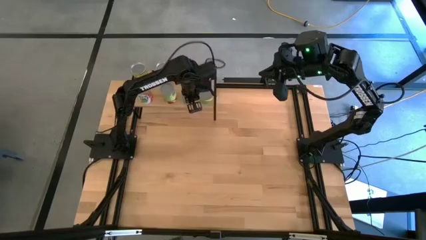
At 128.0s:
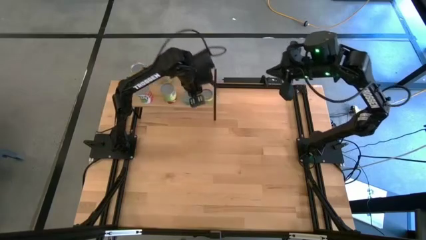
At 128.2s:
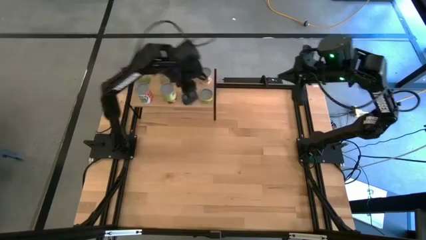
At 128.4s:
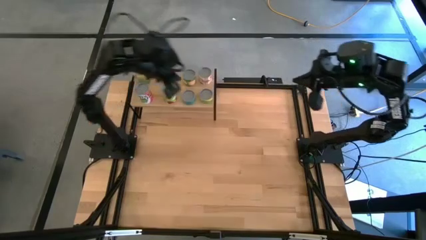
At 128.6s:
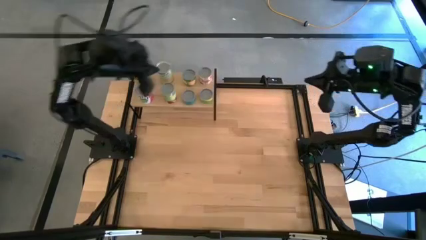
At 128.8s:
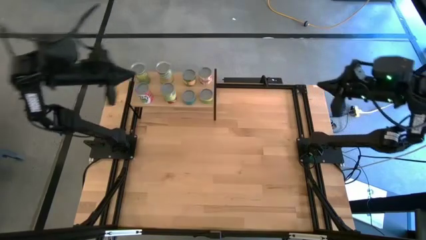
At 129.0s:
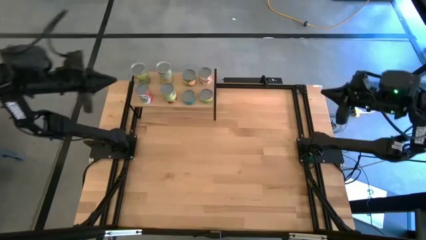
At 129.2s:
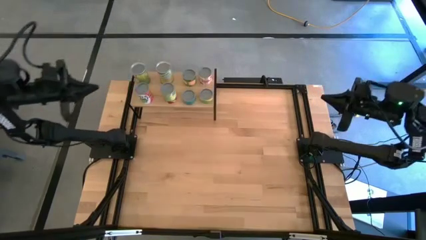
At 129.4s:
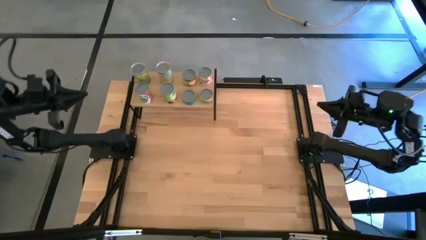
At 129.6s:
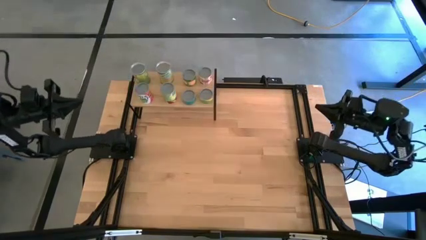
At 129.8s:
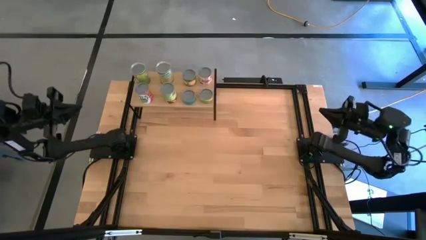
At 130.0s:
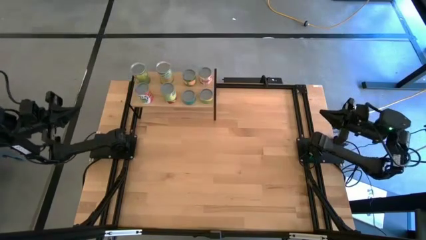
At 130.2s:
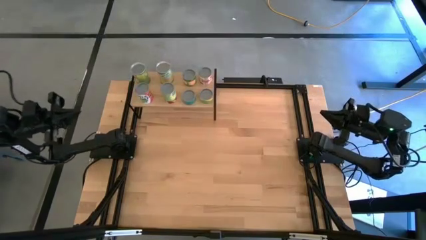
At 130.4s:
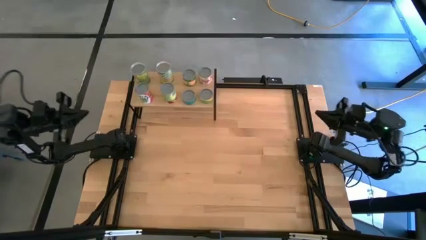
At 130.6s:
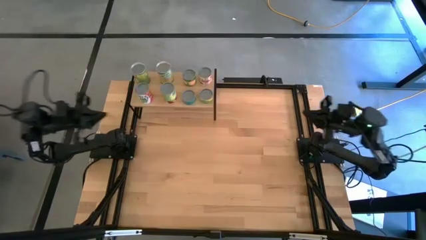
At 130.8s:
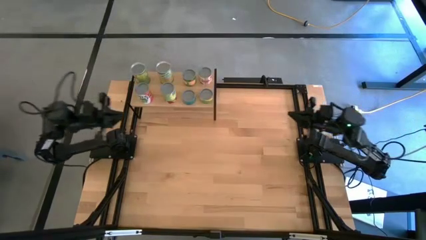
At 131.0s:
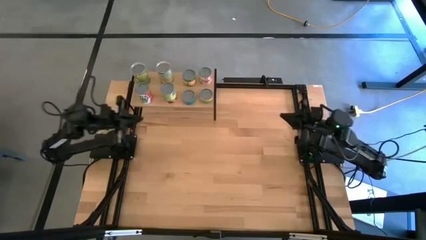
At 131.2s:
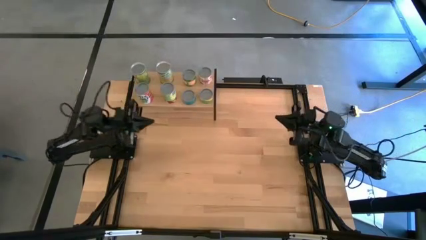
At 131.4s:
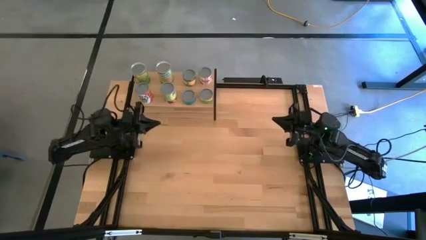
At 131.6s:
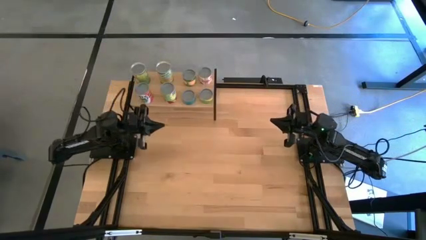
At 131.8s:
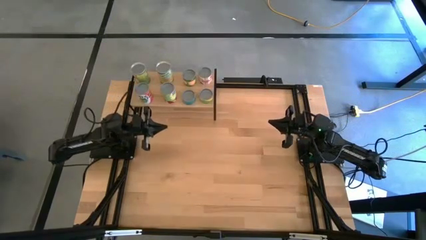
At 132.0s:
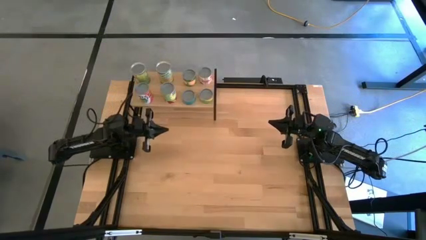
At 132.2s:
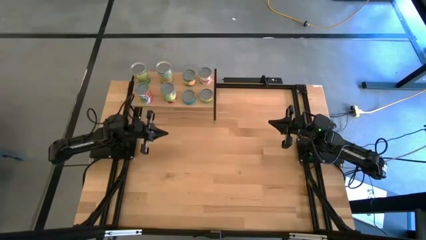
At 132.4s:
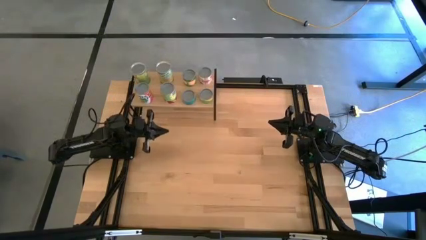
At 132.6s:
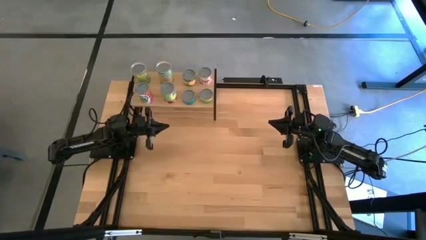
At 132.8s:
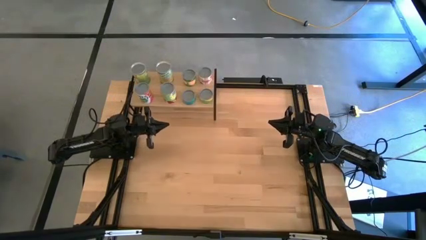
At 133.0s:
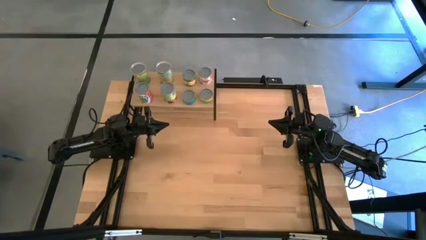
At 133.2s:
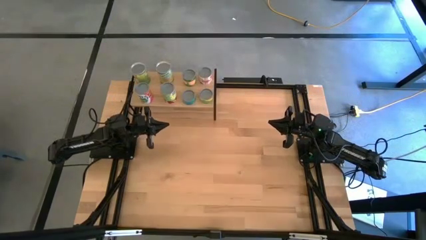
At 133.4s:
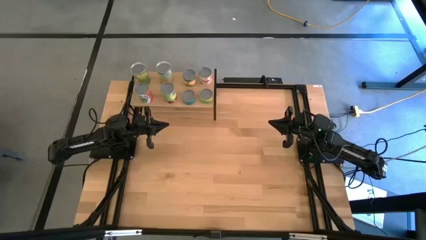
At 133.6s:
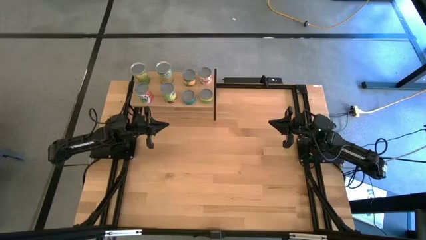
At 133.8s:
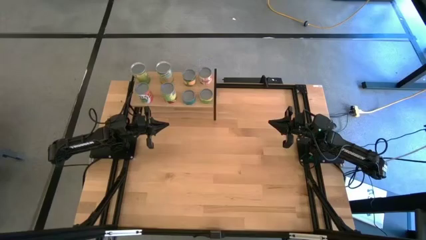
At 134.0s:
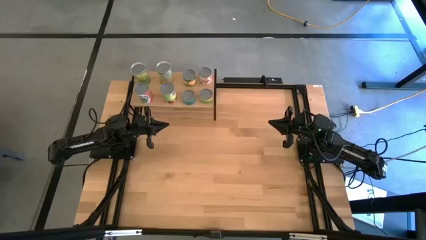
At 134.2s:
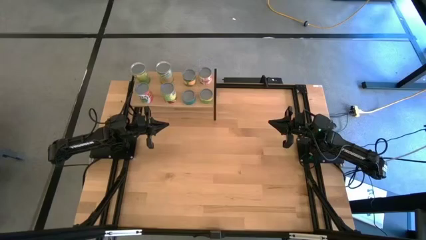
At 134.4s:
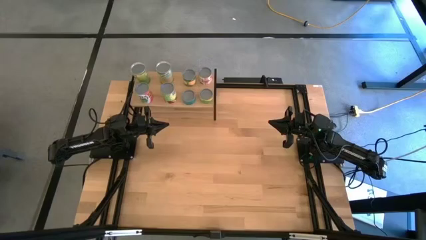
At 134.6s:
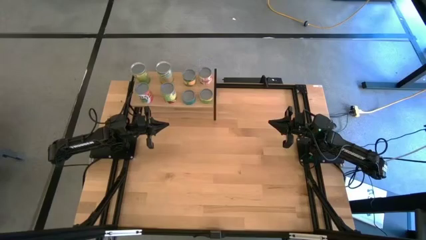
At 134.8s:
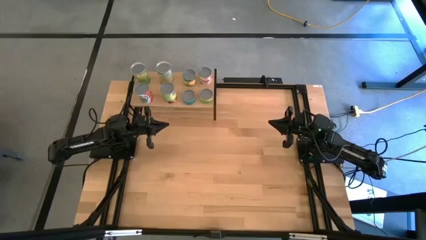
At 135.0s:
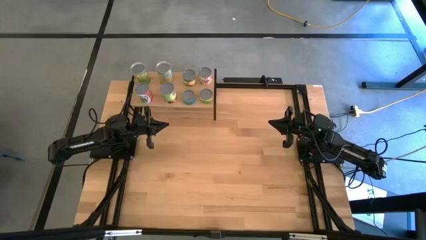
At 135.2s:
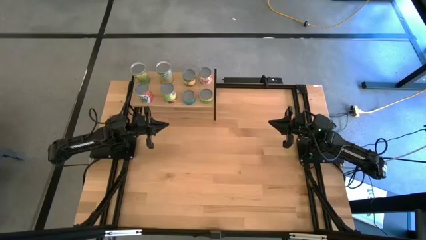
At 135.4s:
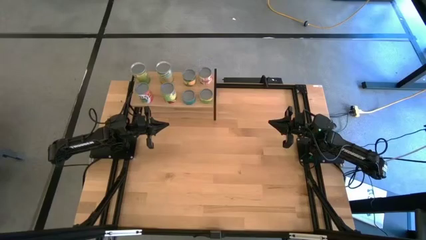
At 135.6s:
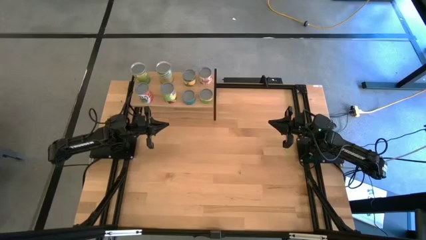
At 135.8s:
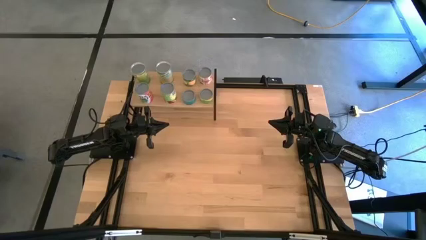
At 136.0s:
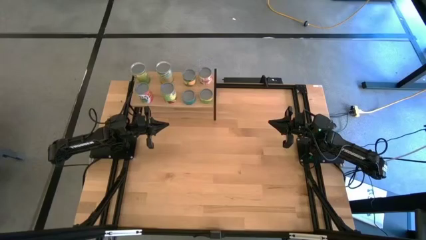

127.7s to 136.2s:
Task: Pick and place cans onto a shelf
Return to Home Position

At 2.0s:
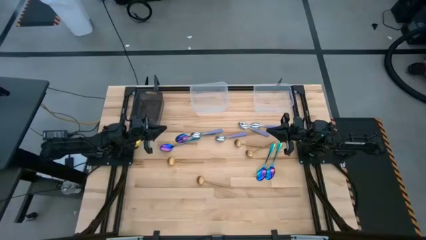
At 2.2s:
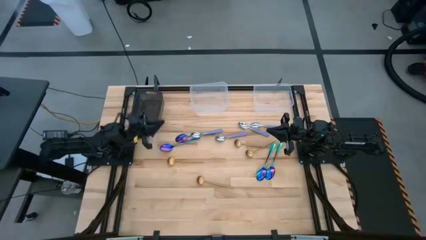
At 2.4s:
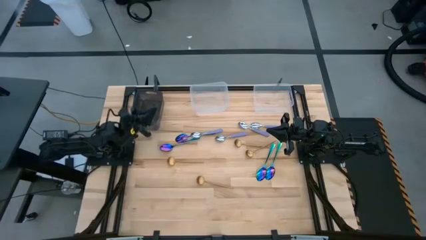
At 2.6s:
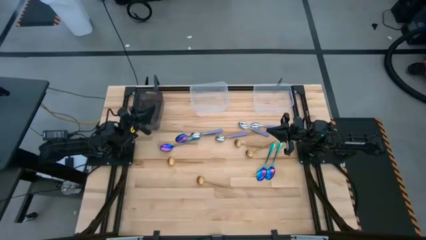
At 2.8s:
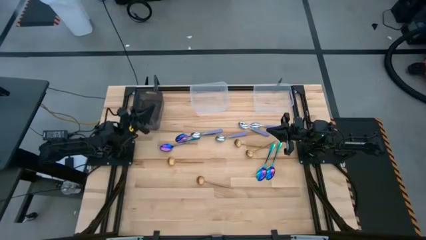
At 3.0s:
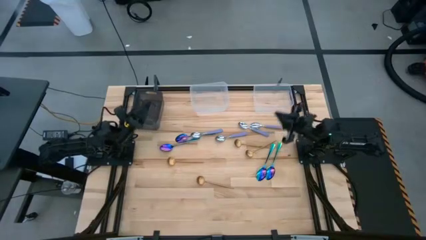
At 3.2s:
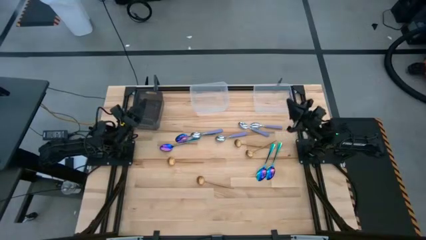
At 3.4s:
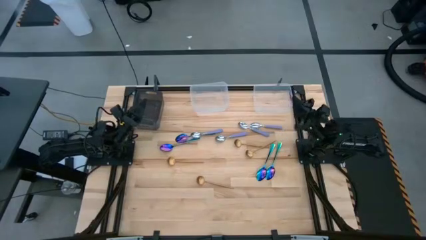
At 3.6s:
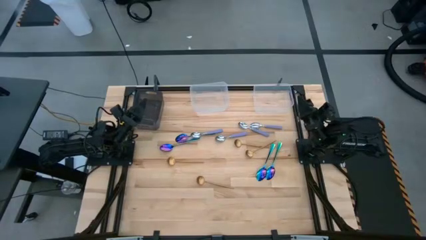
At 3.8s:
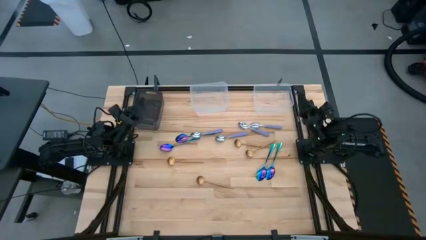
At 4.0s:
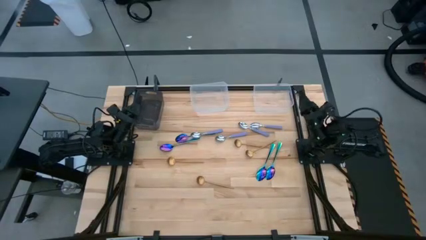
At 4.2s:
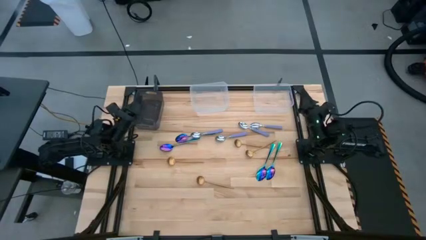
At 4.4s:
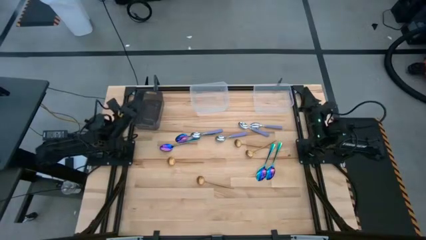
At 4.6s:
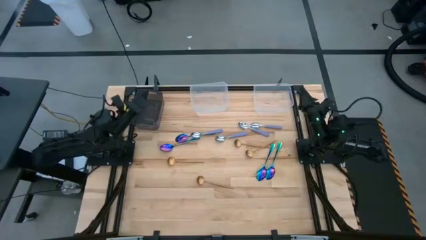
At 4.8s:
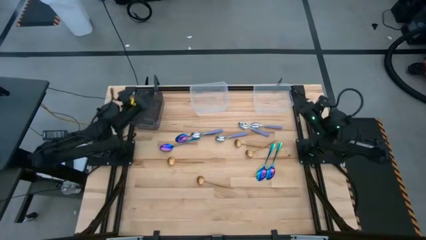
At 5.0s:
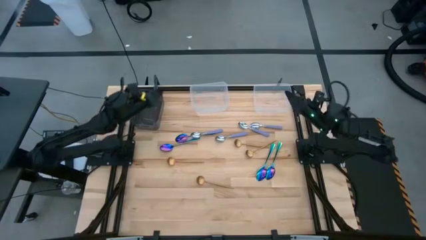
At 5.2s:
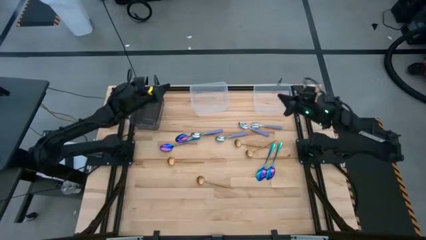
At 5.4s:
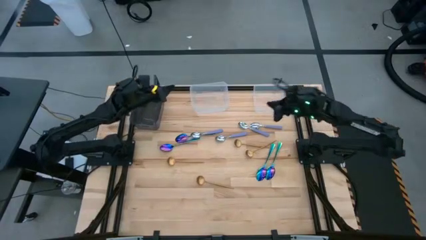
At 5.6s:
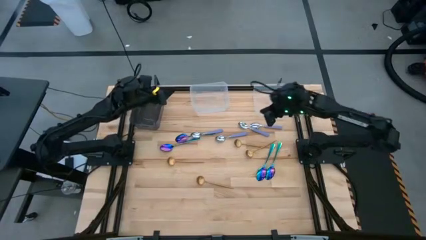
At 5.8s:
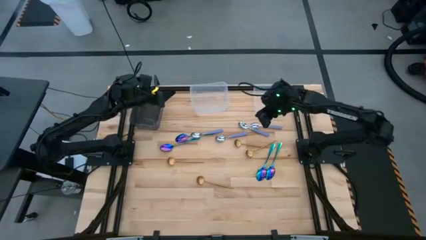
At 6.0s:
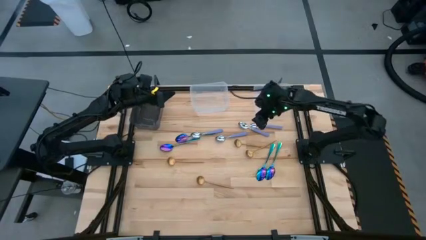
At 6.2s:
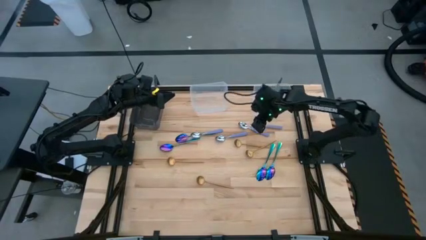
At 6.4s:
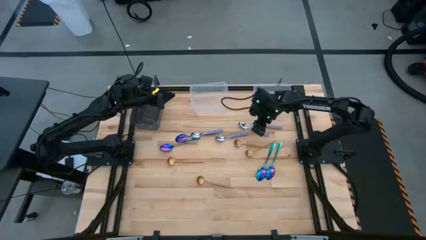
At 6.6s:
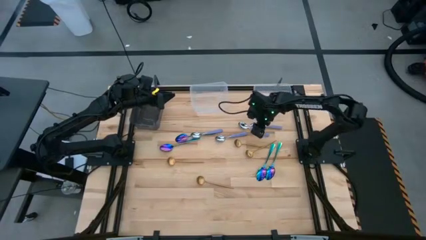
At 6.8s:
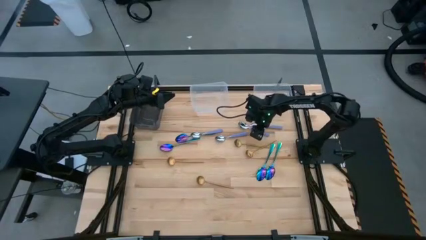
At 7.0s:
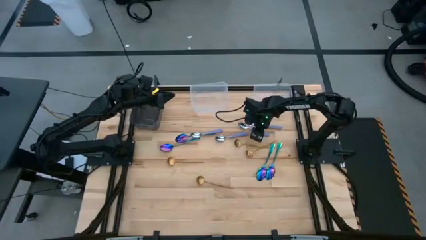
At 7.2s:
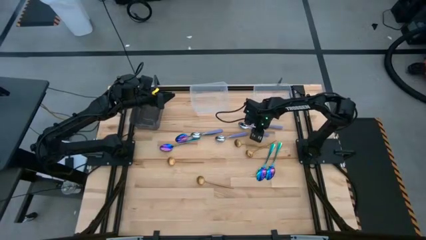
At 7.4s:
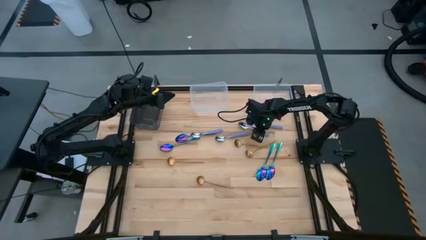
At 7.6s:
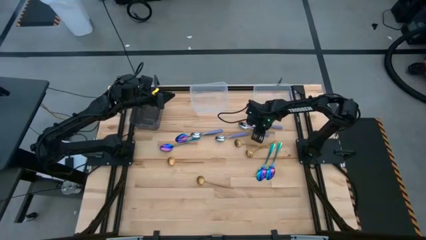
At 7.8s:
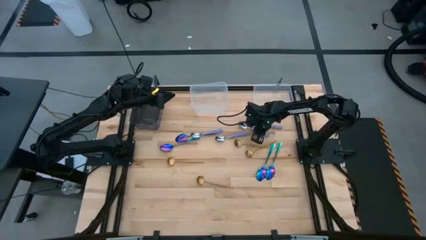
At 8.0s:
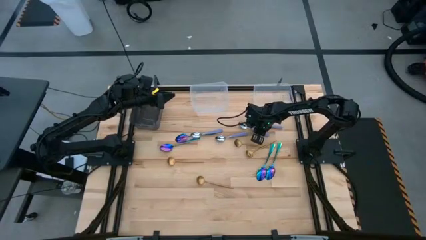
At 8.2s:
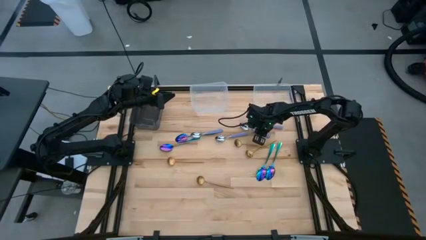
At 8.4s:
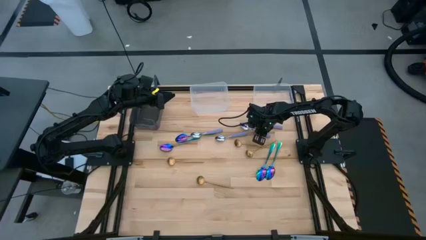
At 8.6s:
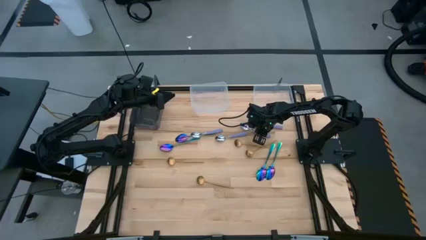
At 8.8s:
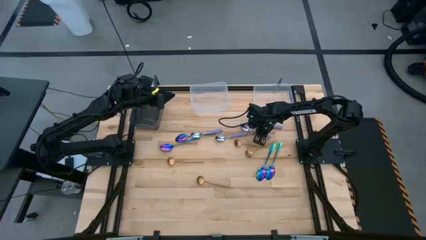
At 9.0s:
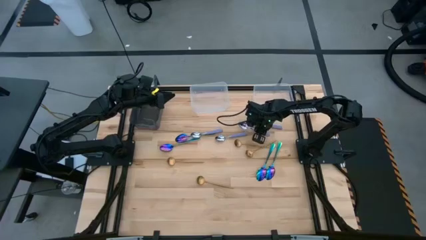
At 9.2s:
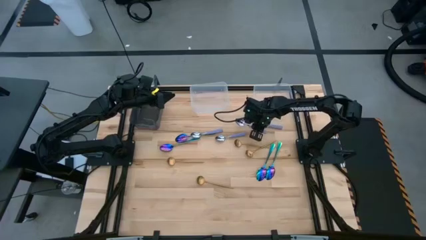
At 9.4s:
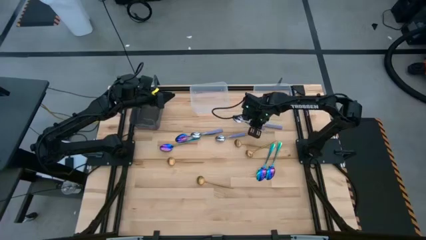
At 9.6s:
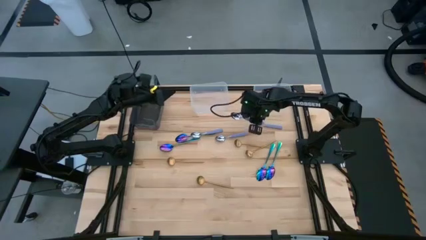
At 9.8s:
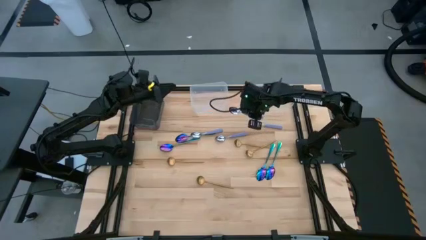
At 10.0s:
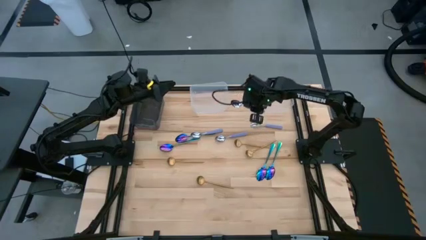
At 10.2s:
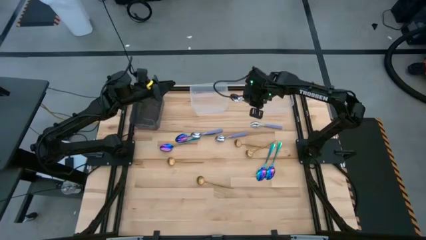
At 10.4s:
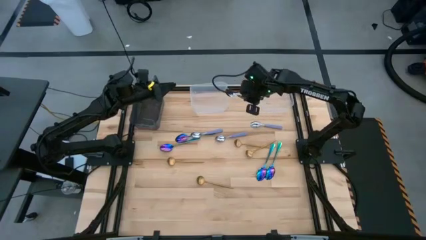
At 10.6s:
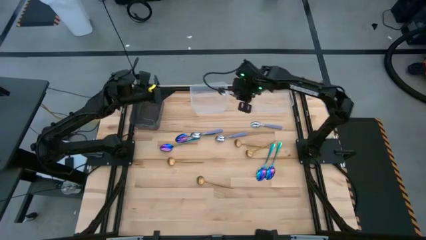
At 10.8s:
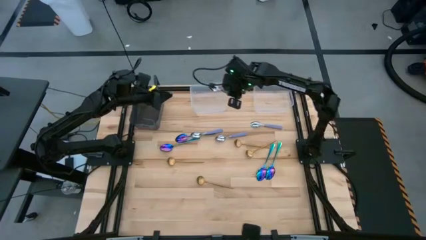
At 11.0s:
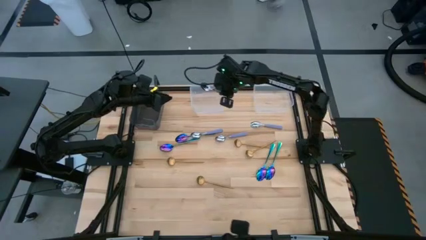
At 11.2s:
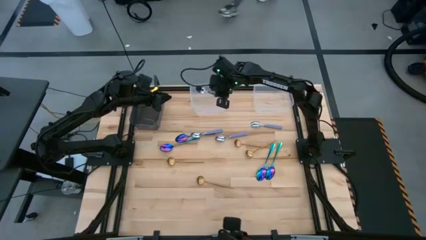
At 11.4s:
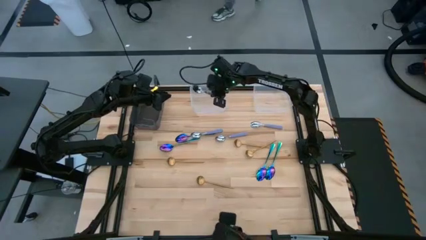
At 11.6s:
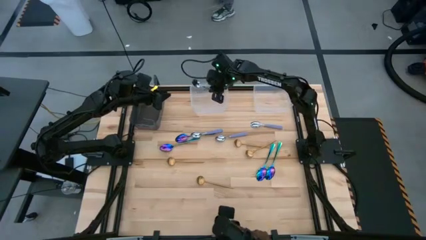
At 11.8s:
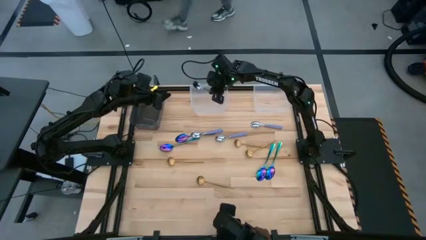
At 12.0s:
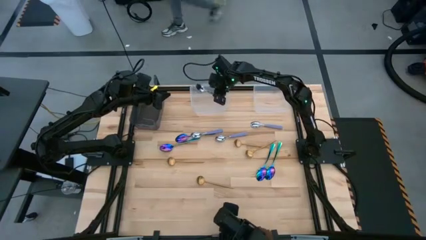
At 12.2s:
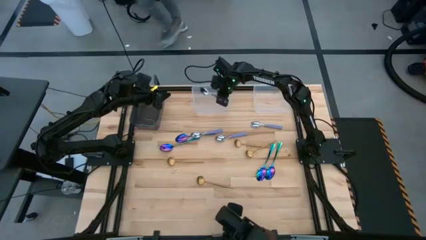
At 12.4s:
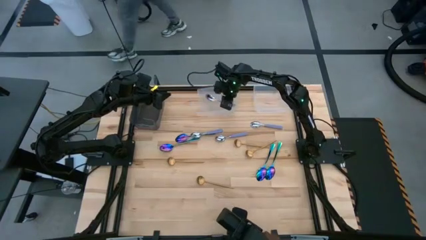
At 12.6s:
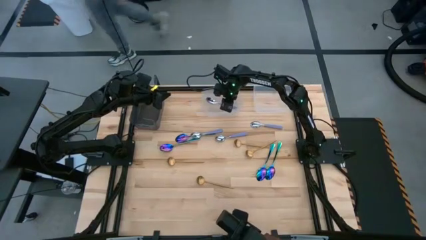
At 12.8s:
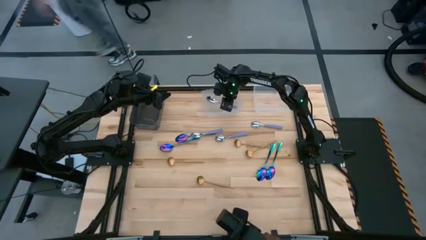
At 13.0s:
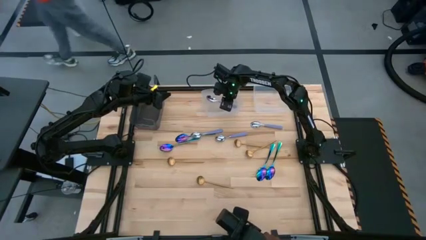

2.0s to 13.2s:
Task: Sort silverware by color (type)
Put the purple spoon into the left transparent bin
